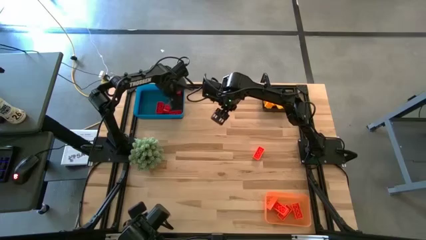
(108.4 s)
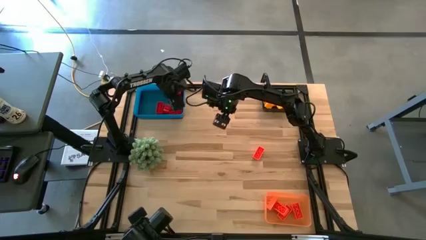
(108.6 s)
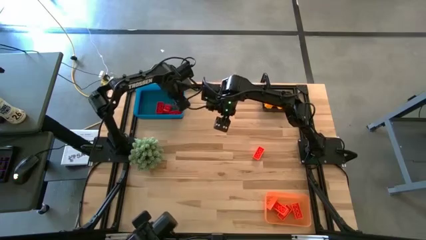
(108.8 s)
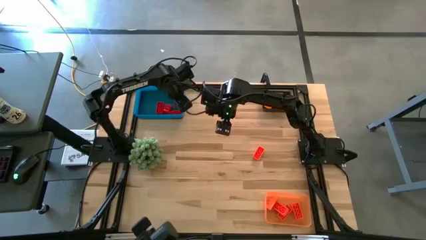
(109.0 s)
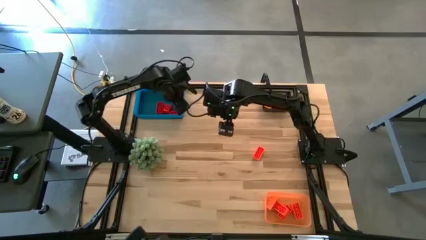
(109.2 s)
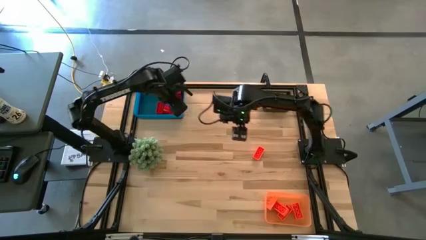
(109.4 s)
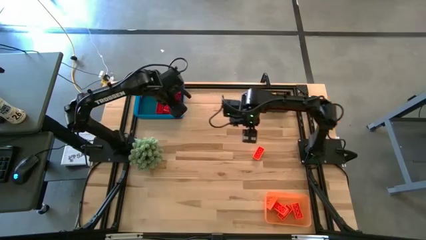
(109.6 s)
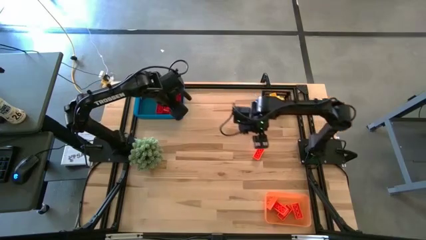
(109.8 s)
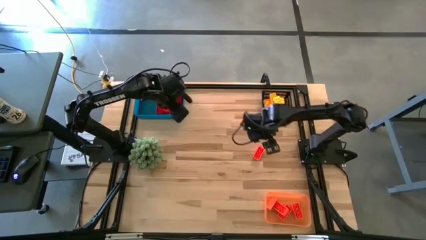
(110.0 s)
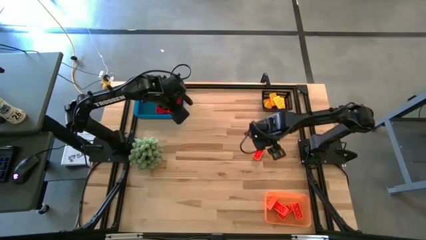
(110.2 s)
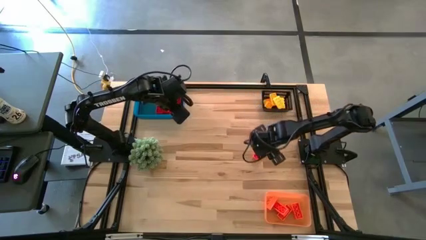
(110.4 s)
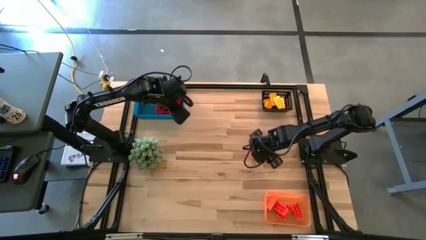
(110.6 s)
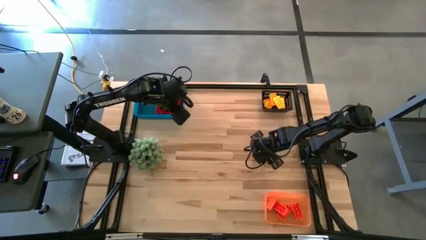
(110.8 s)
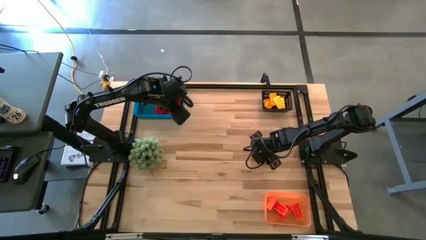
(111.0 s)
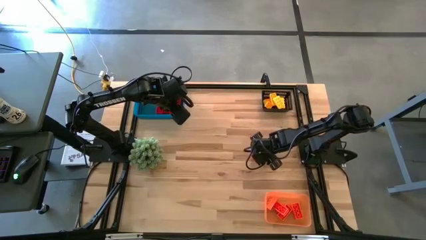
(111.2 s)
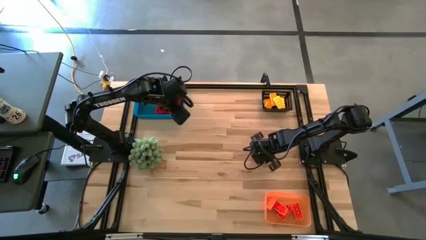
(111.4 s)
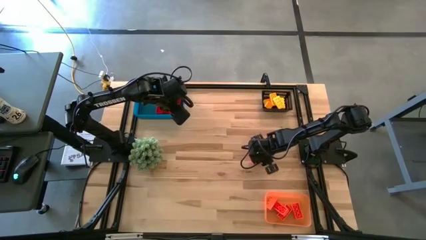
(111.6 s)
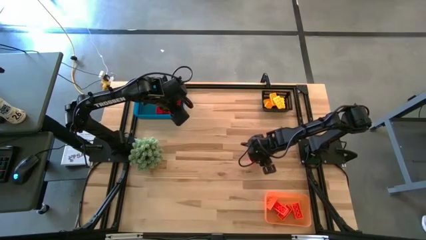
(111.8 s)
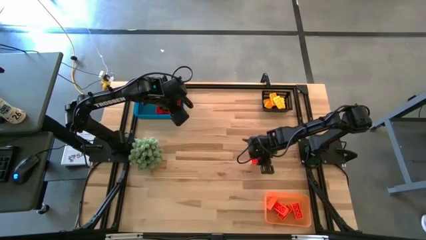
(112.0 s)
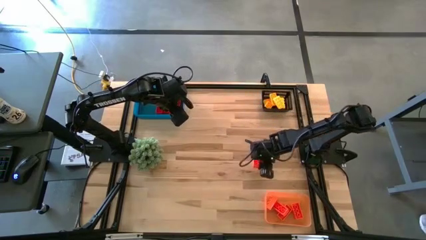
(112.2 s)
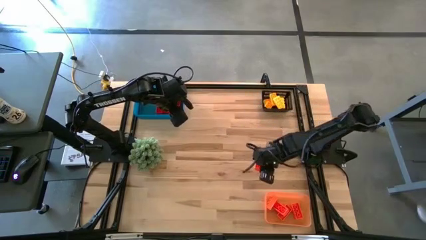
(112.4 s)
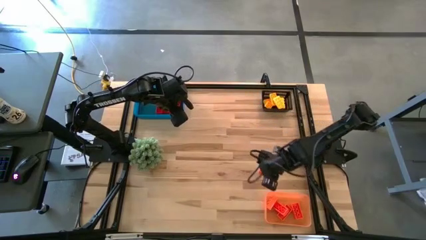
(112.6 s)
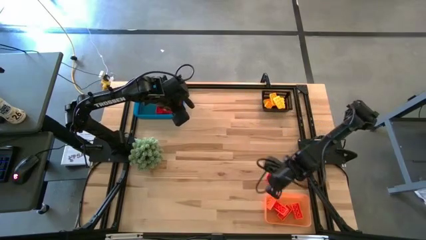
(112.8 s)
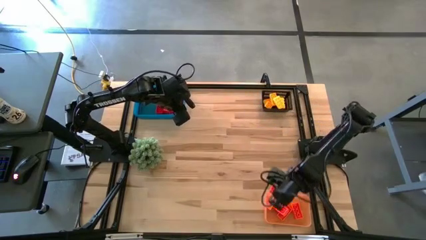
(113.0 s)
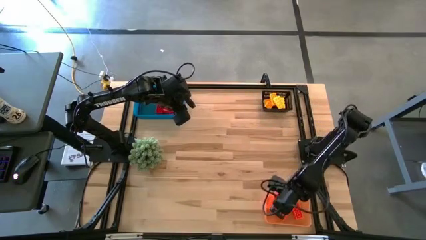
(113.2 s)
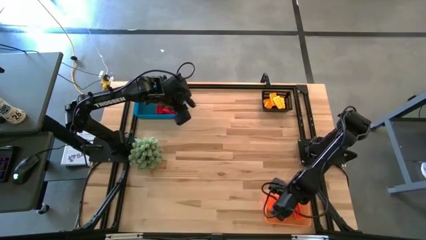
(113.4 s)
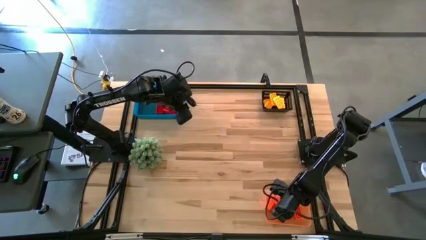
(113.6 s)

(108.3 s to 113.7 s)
Task: Sort & place blocks by color
Put the orange game piece into the orange bin

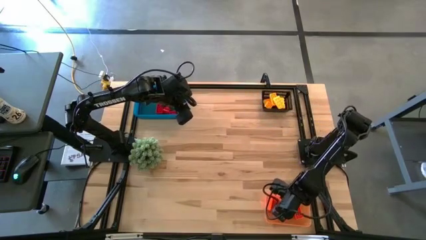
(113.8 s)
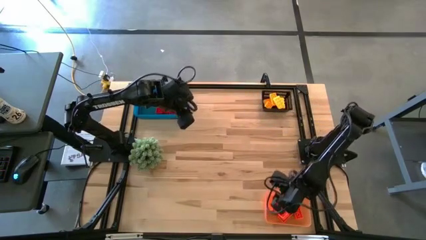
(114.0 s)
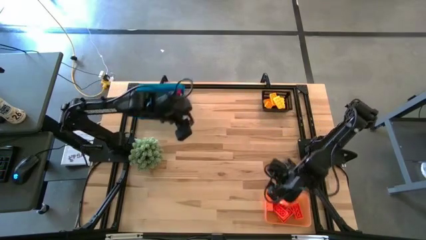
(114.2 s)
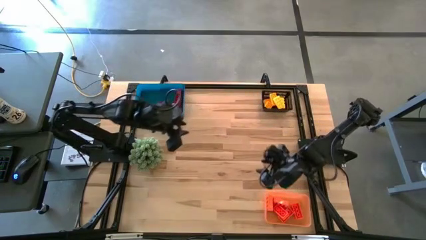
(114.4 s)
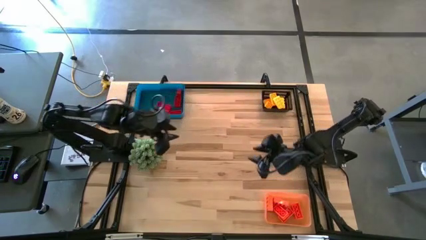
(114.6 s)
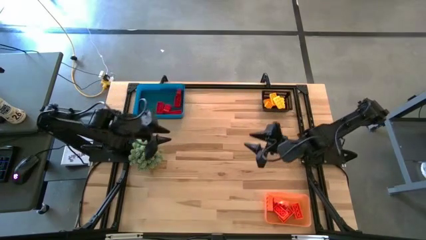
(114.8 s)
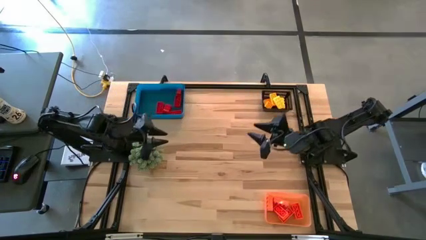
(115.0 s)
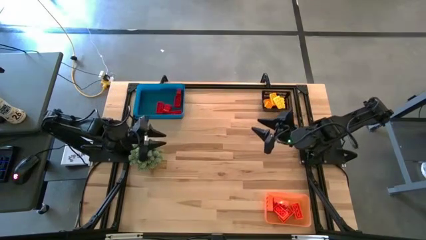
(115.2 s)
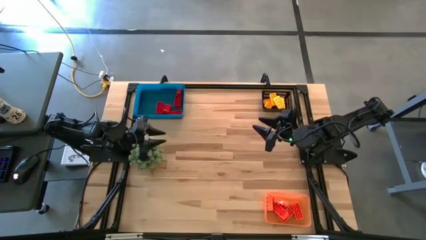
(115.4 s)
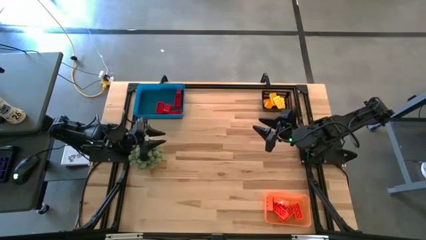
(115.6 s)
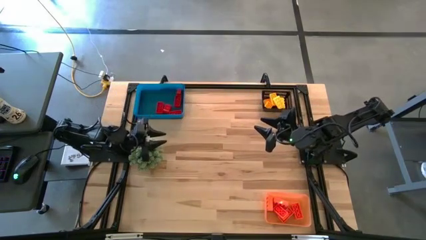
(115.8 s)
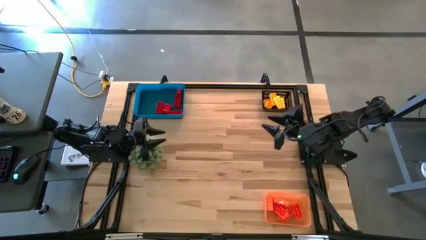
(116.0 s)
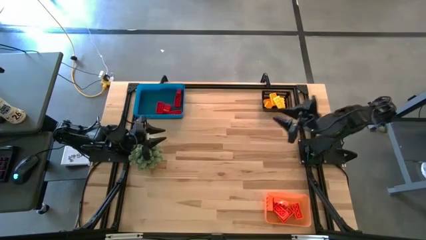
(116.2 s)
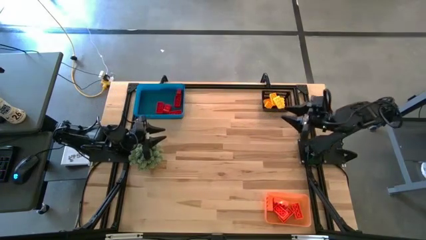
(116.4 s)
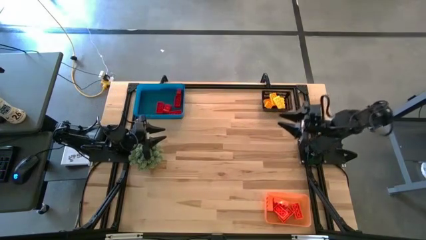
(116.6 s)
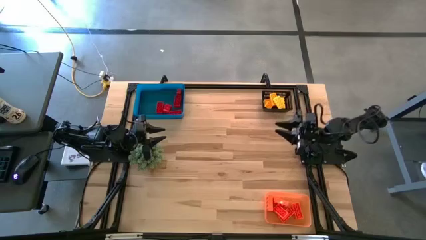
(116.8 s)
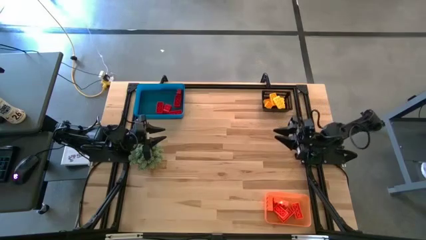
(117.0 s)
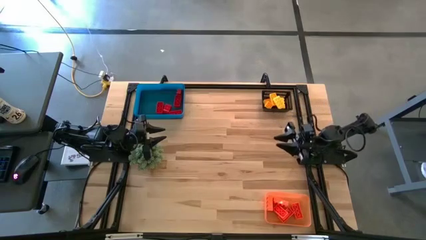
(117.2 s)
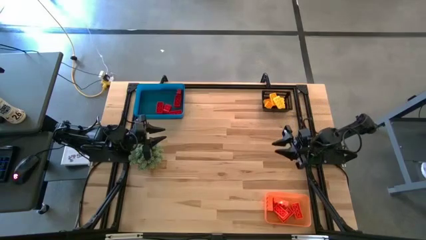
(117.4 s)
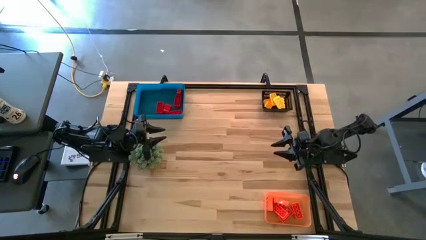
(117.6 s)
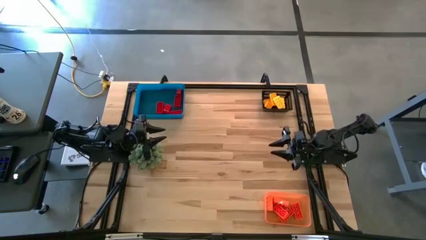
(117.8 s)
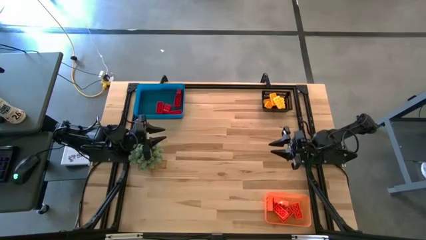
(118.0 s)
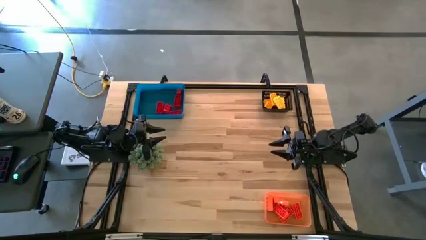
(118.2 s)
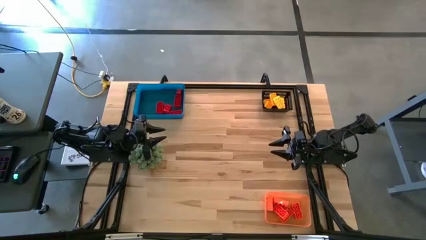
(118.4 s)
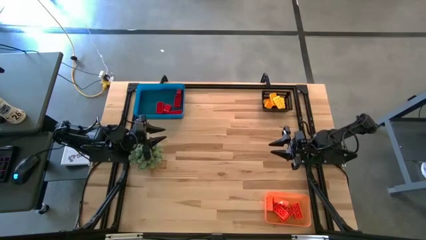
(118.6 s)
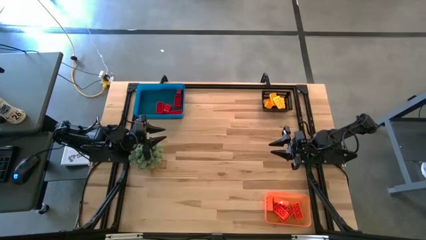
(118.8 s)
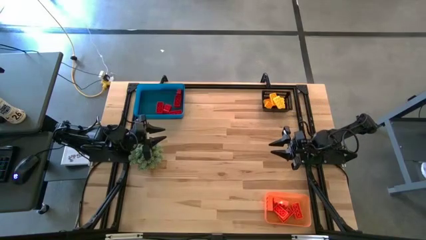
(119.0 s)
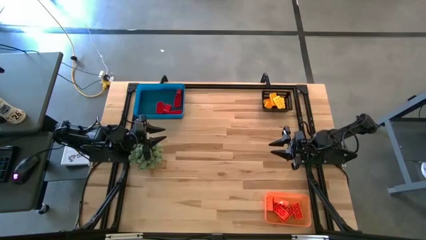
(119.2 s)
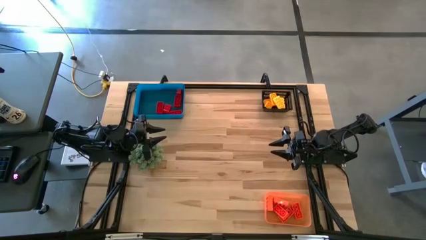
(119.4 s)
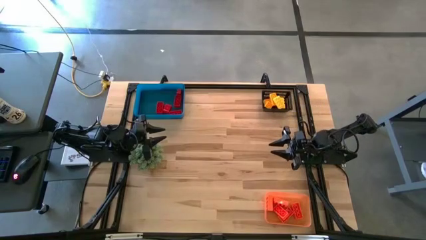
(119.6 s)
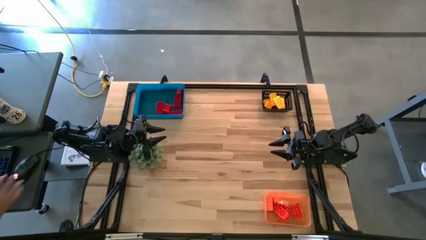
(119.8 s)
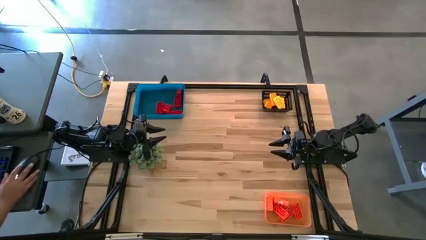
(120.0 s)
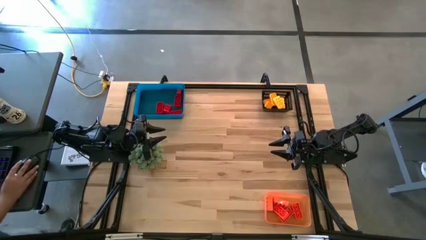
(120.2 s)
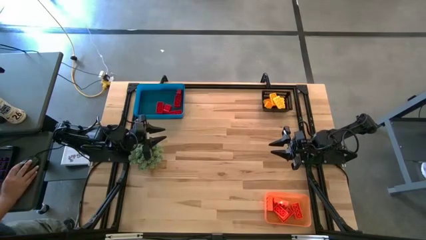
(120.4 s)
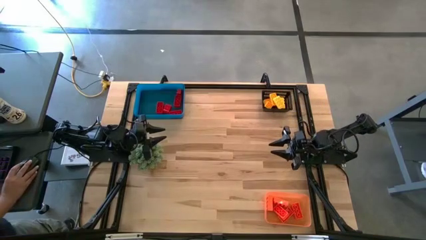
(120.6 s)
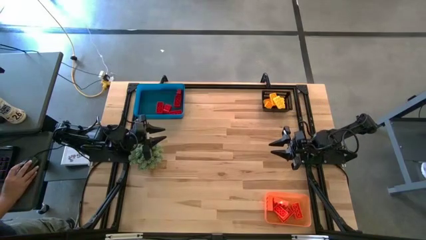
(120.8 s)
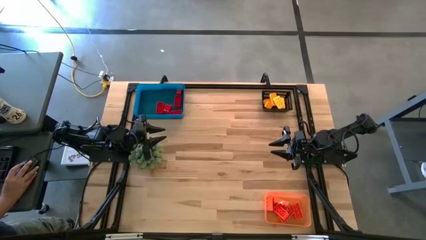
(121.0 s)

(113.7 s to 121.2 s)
Return to Home Position
